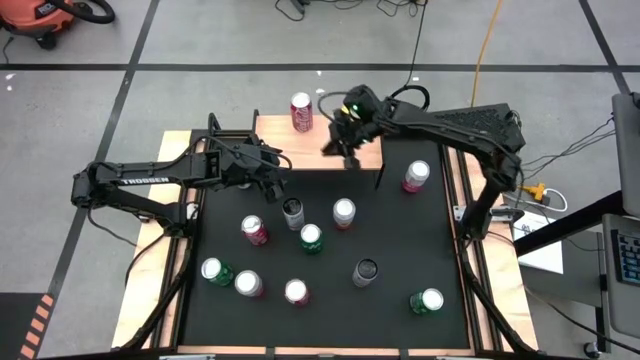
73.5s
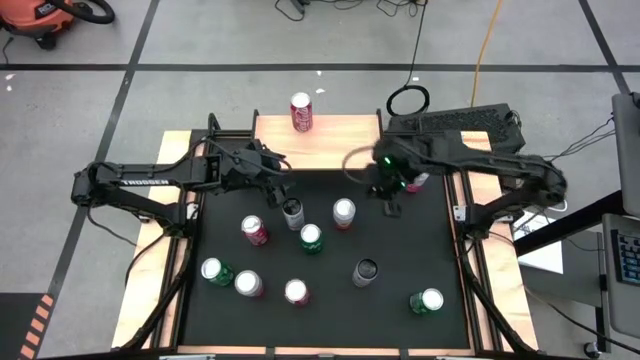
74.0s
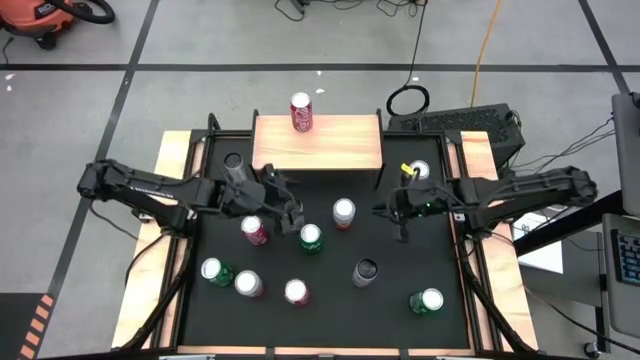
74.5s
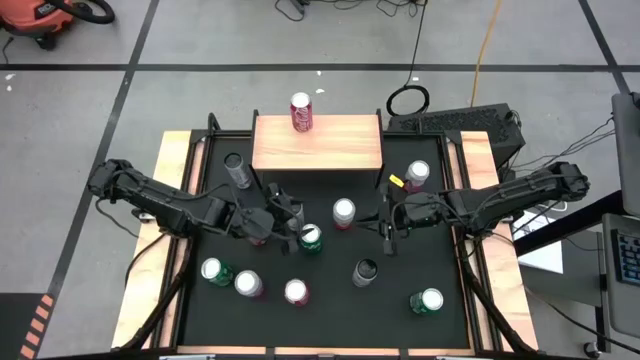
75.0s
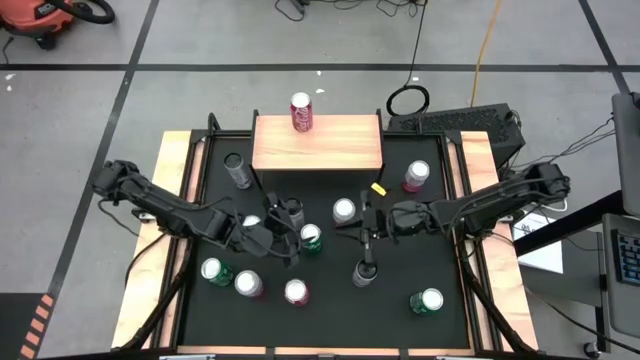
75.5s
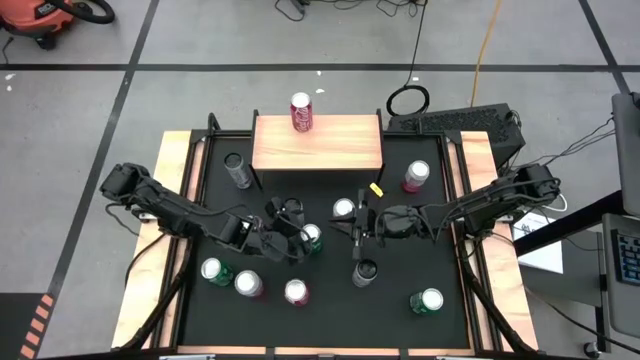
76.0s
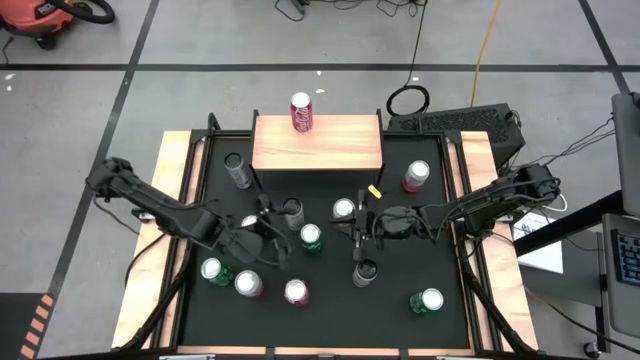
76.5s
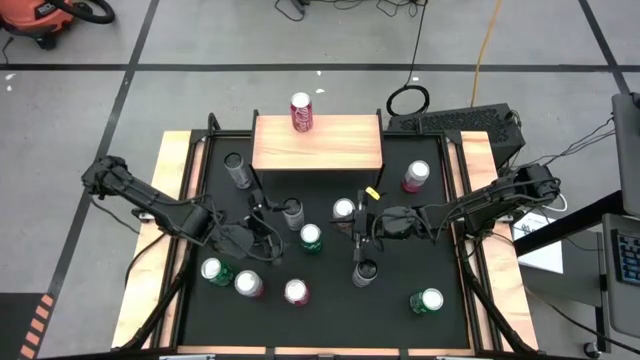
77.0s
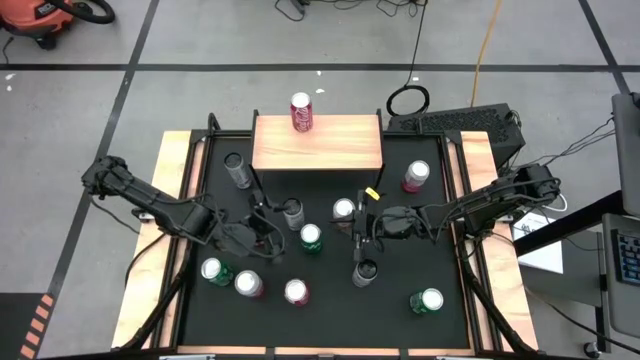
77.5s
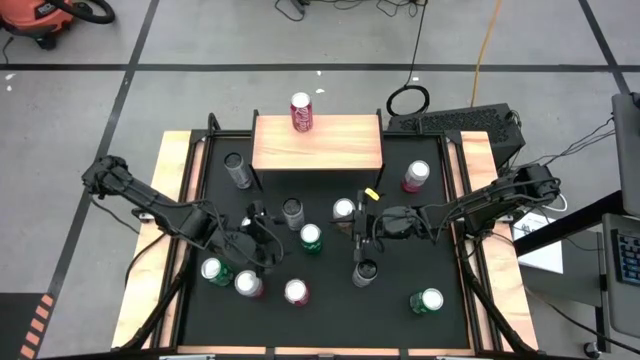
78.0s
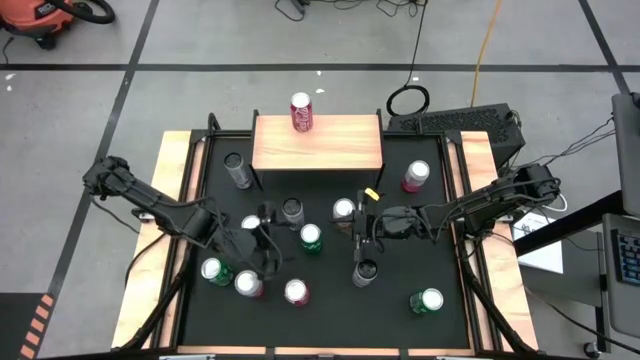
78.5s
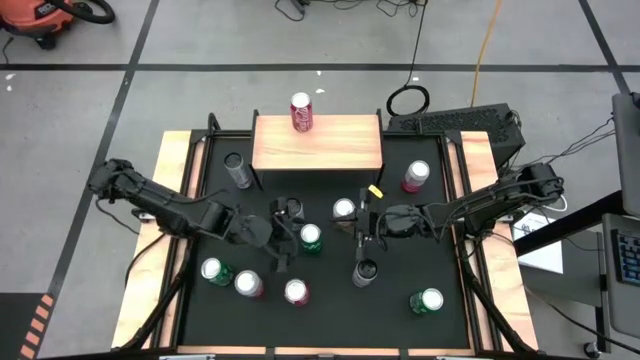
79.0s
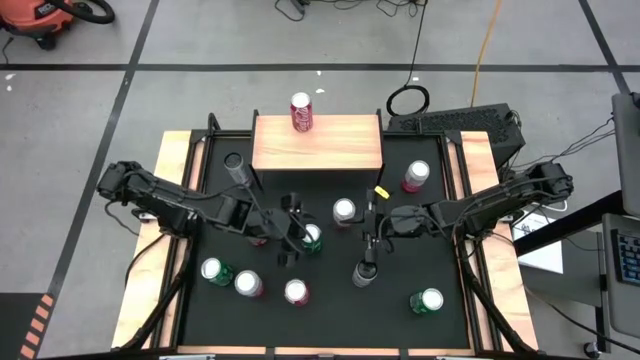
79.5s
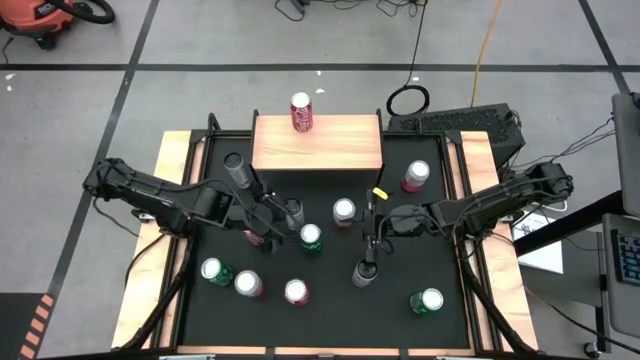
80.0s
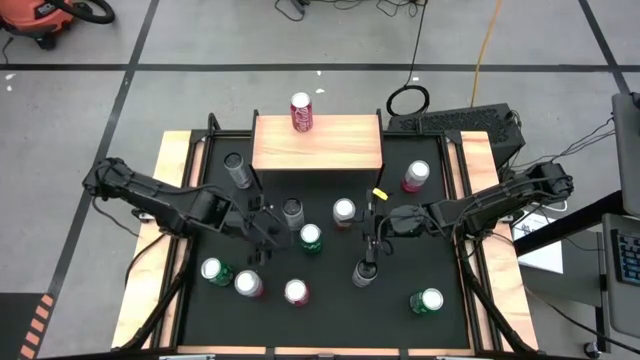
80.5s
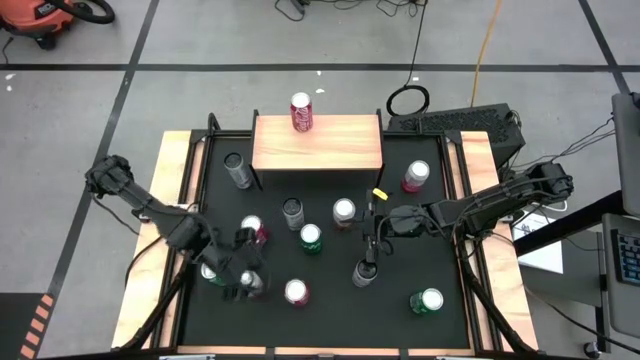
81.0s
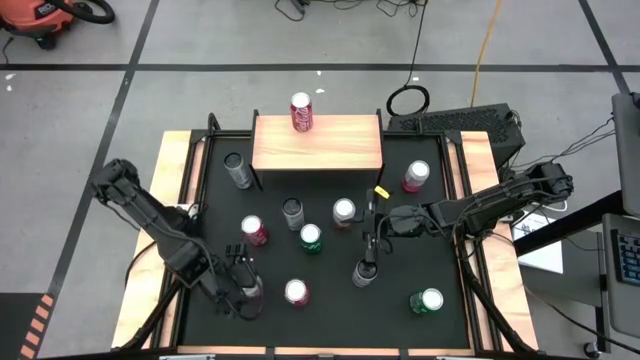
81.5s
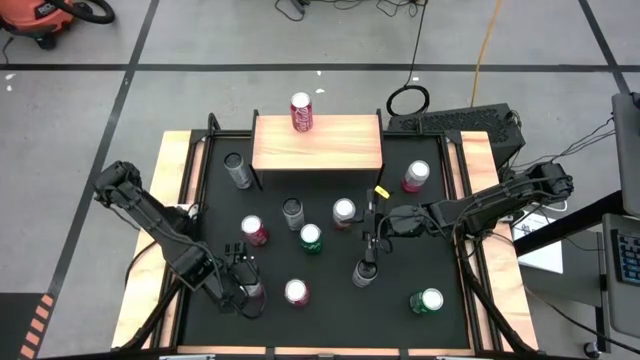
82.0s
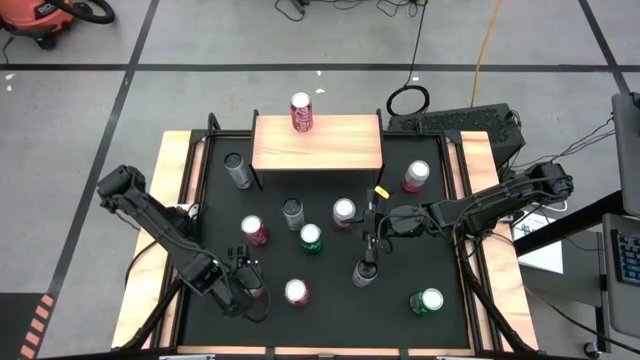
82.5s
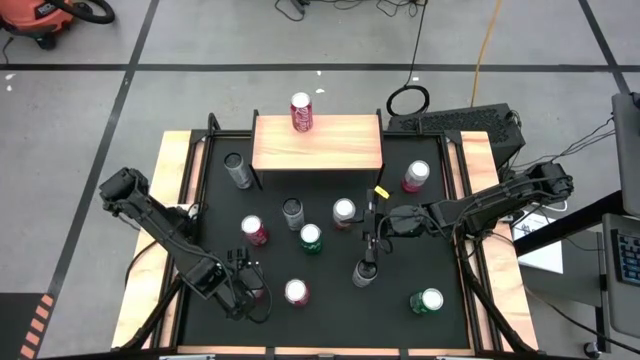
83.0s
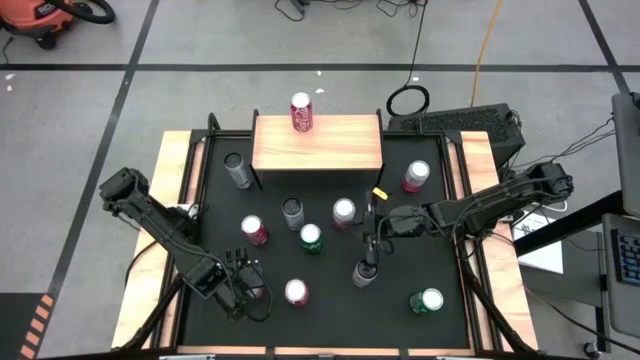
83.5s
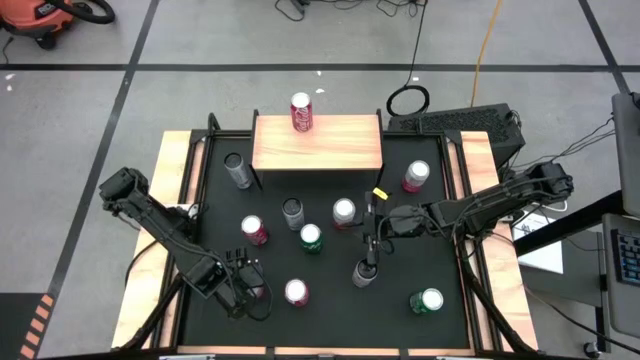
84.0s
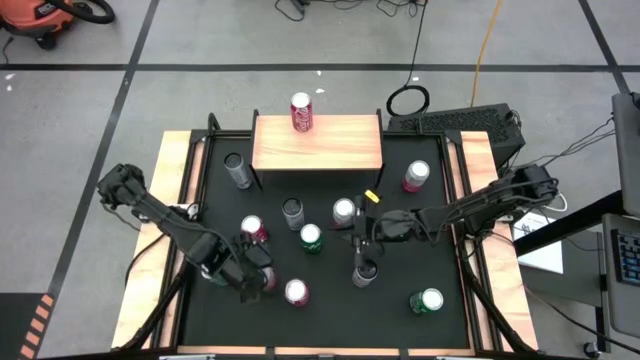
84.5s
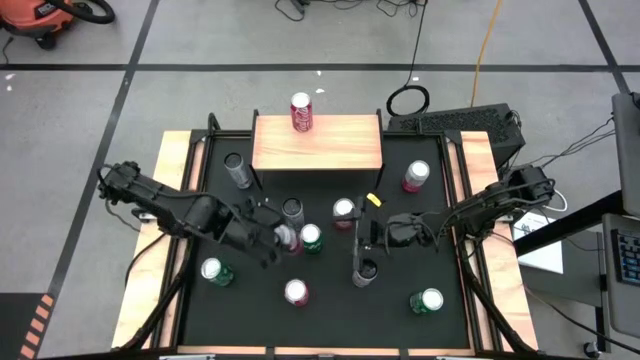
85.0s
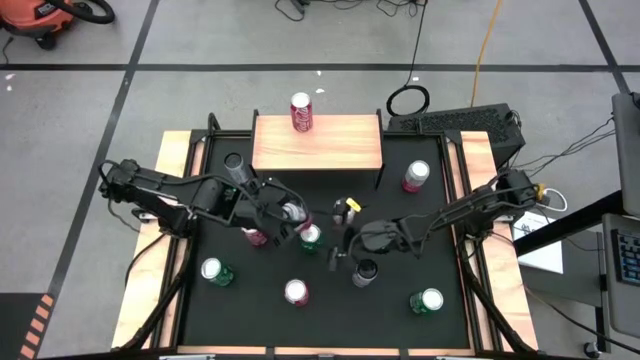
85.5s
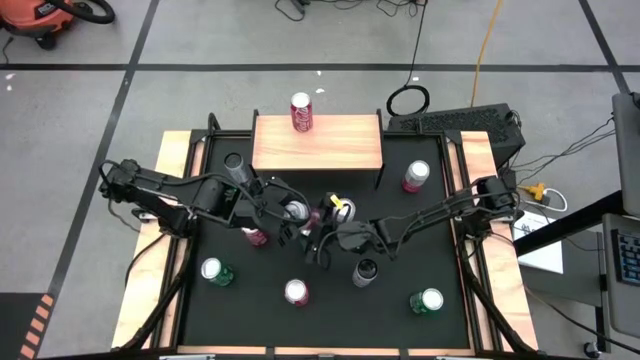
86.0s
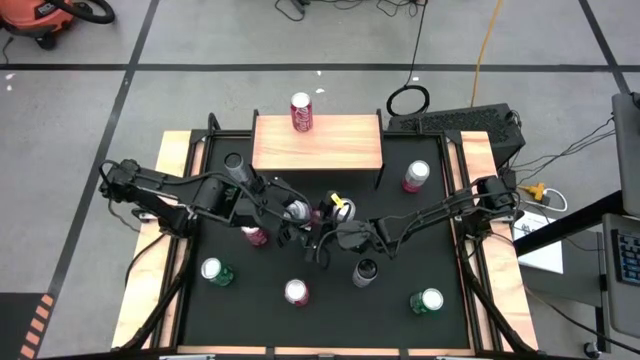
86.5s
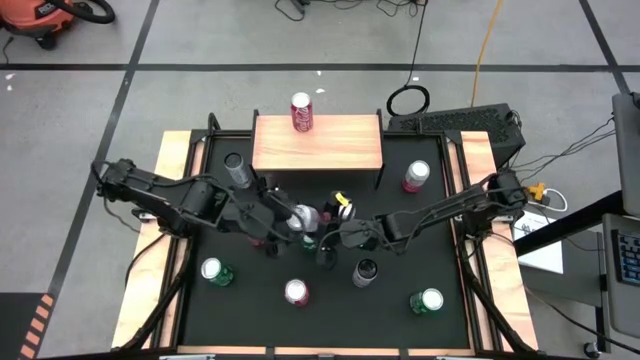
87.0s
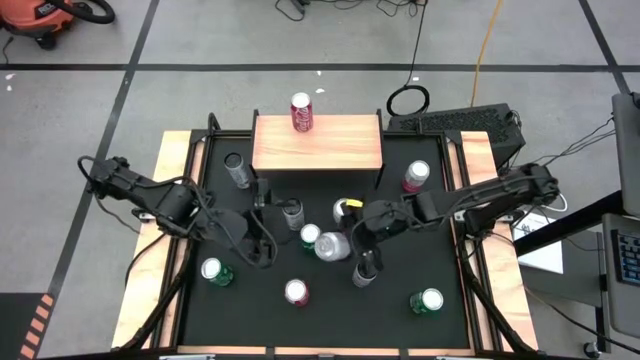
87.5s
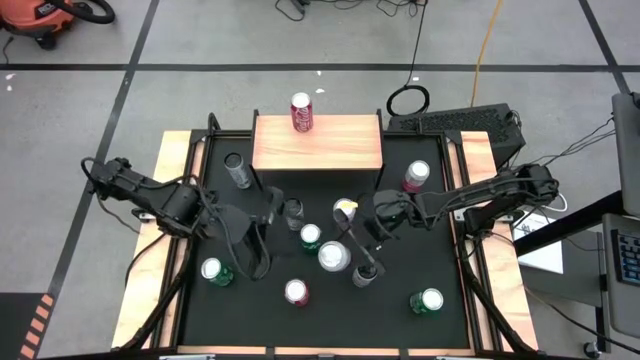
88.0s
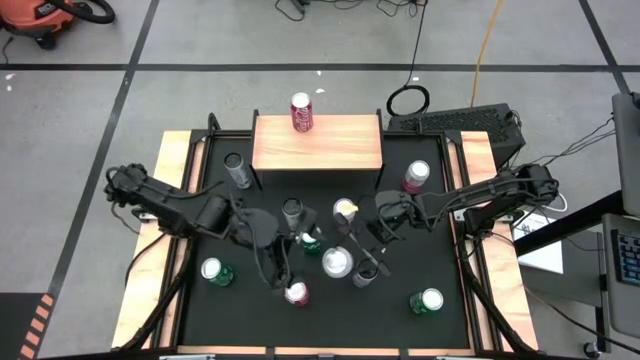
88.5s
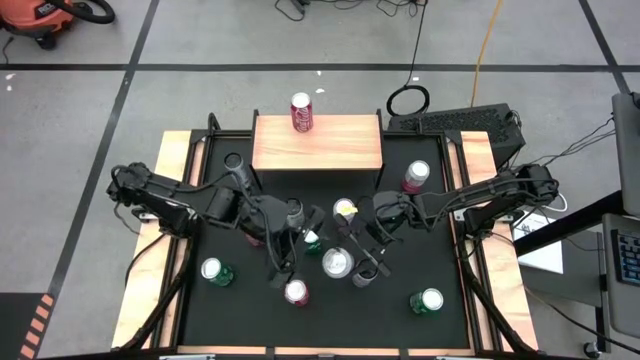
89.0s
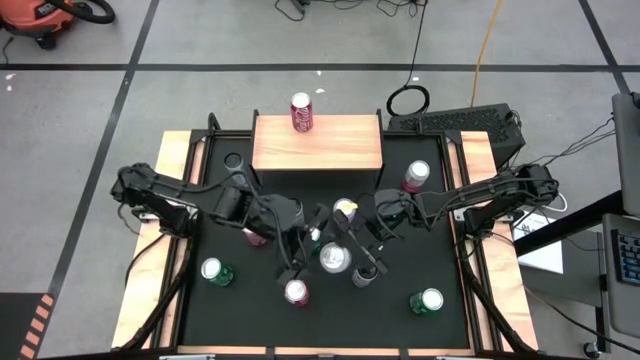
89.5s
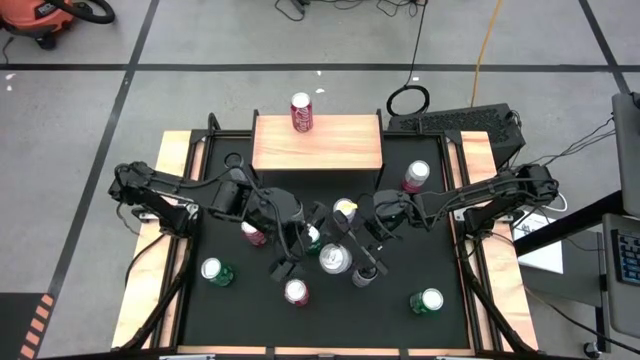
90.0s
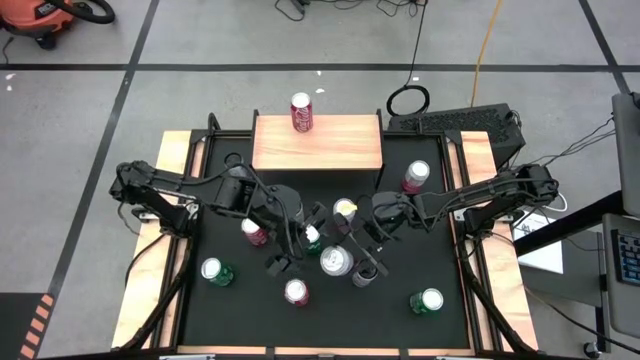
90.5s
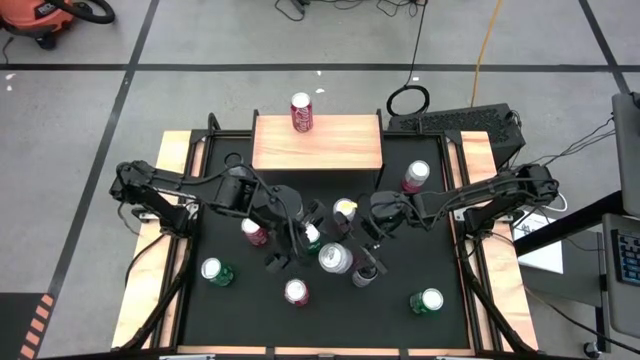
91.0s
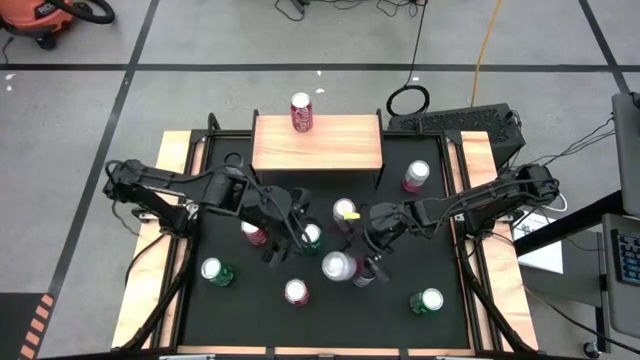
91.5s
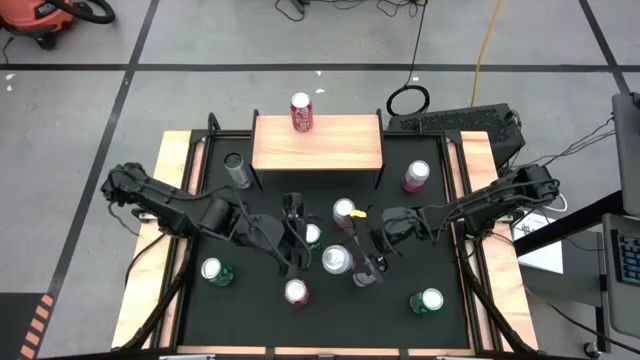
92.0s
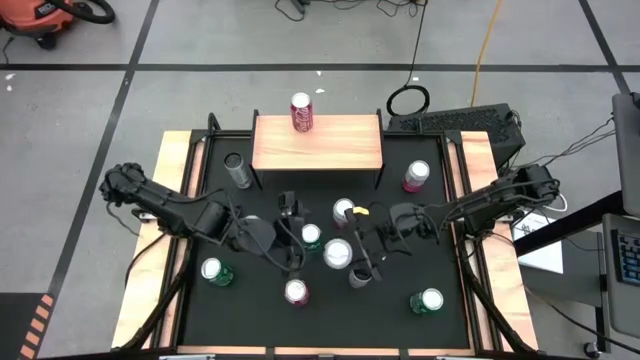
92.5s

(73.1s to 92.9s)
Task: Place canned beverage on shelf
Put the bottom white pink soda can on the shelf

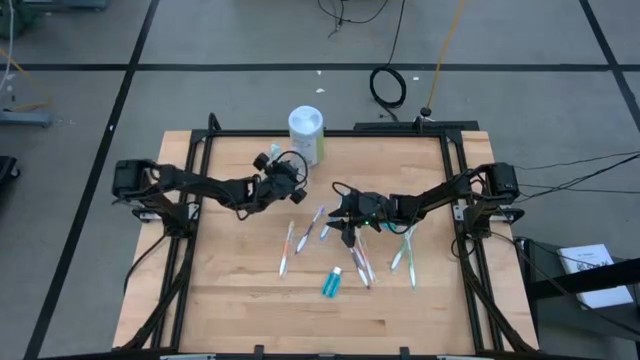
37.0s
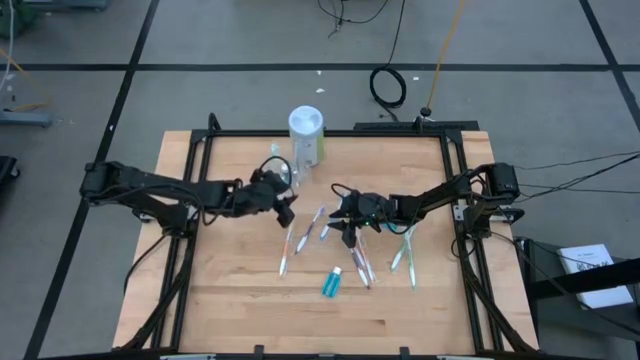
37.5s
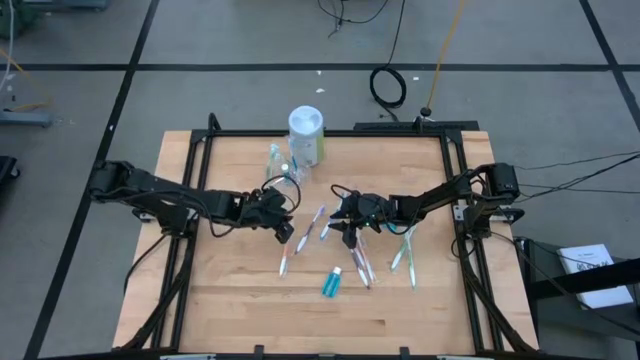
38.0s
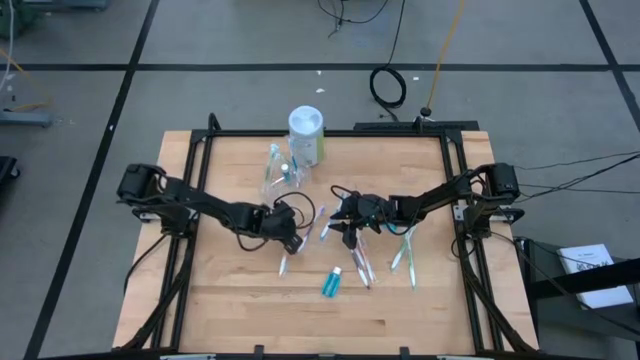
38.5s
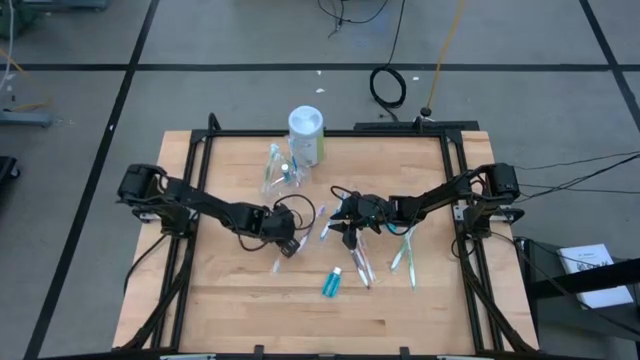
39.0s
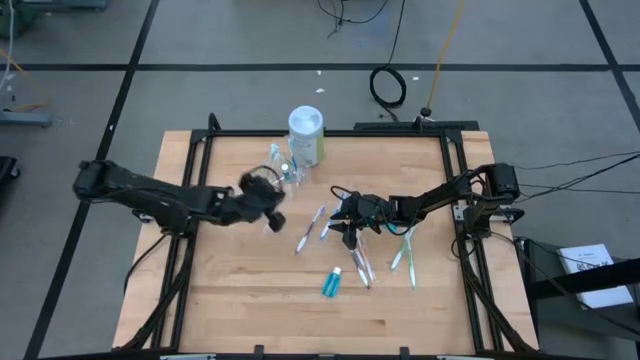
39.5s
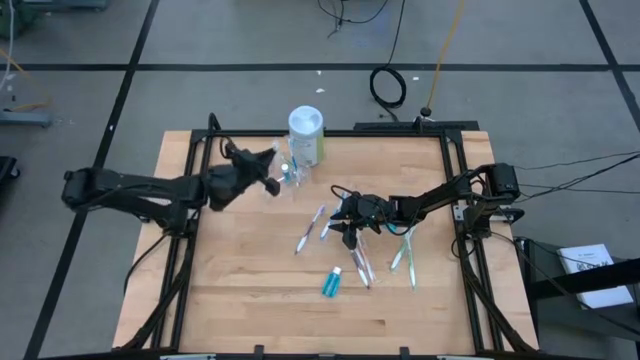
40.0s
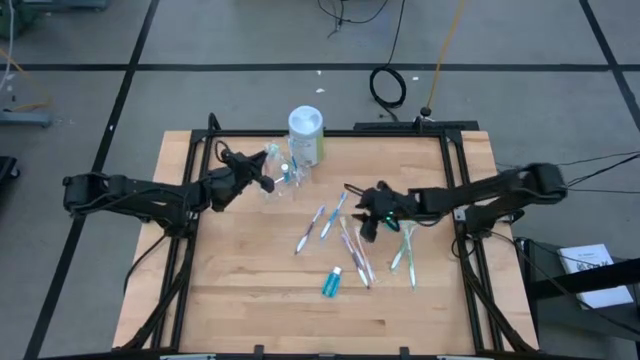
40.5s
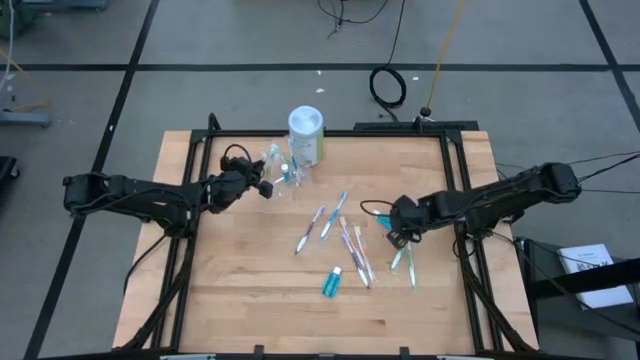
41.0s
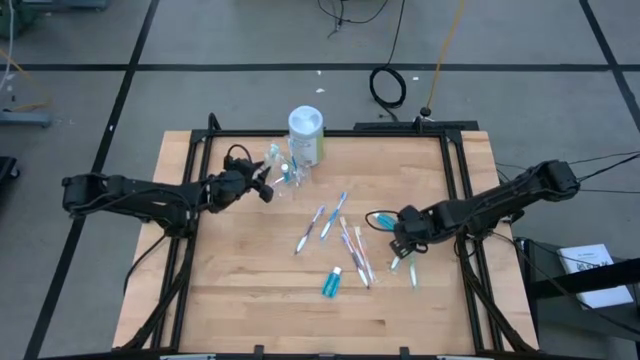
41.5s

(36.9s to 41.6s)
Task: Pick & Place toothbrushing station
Put the left orange toothbrush into the transparent organizer
